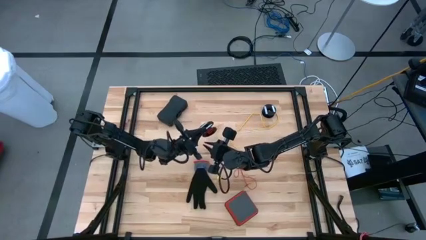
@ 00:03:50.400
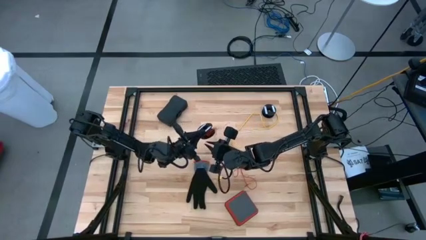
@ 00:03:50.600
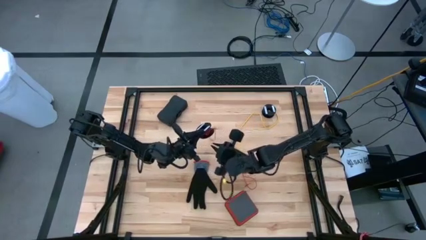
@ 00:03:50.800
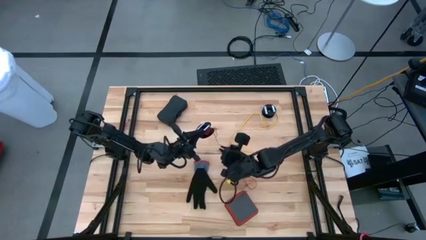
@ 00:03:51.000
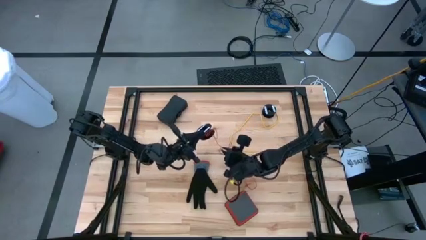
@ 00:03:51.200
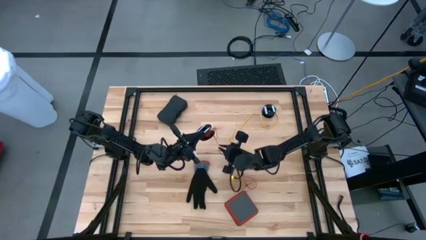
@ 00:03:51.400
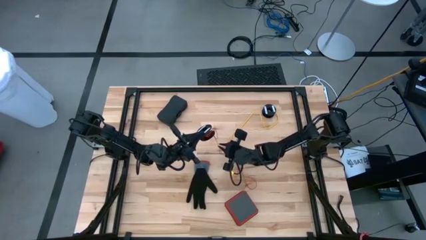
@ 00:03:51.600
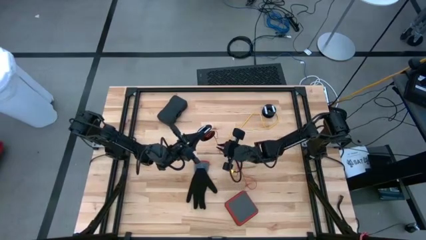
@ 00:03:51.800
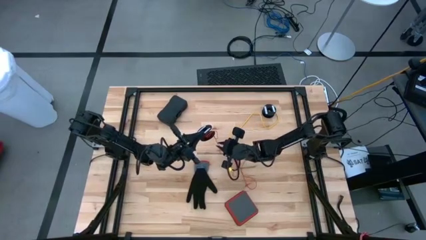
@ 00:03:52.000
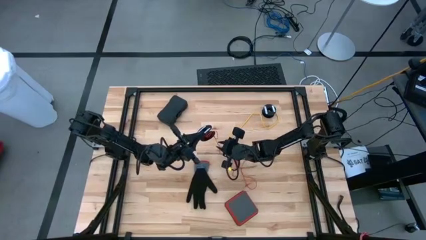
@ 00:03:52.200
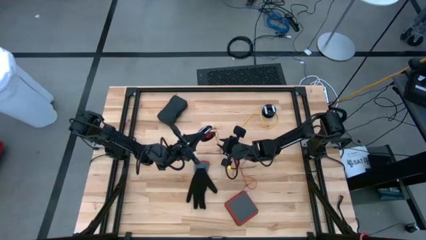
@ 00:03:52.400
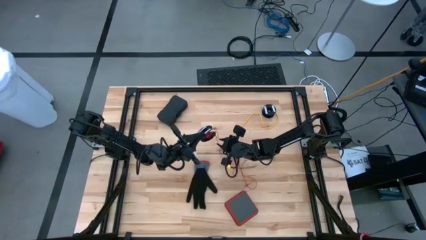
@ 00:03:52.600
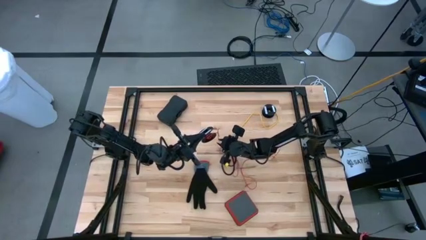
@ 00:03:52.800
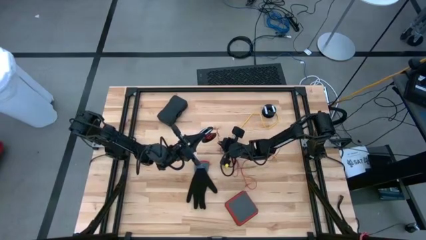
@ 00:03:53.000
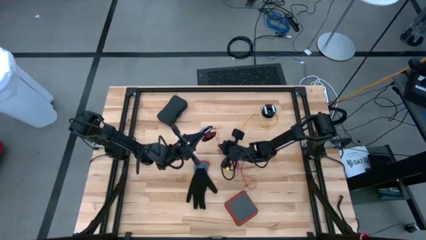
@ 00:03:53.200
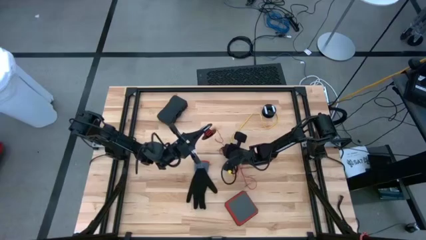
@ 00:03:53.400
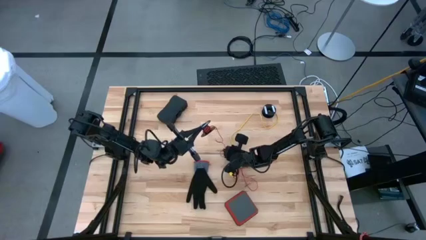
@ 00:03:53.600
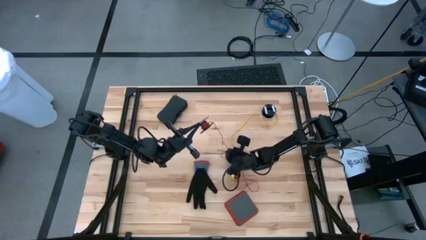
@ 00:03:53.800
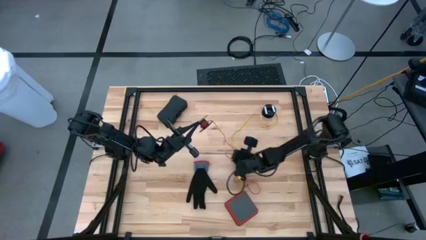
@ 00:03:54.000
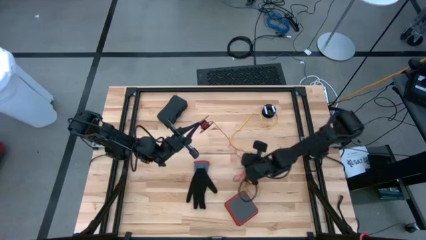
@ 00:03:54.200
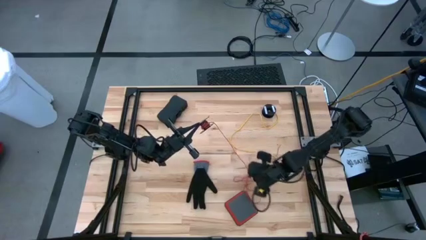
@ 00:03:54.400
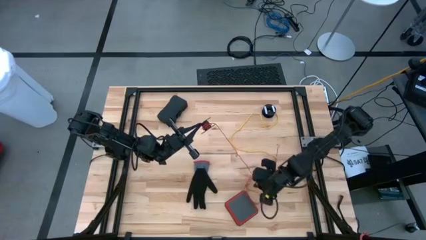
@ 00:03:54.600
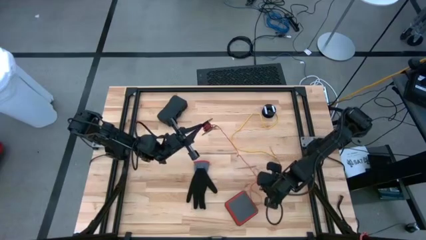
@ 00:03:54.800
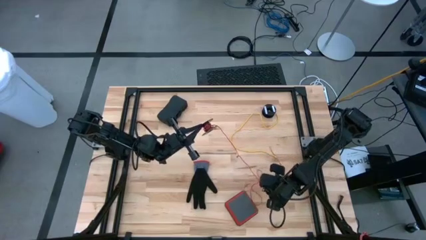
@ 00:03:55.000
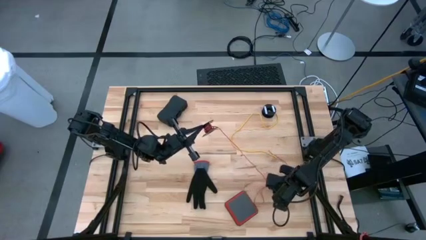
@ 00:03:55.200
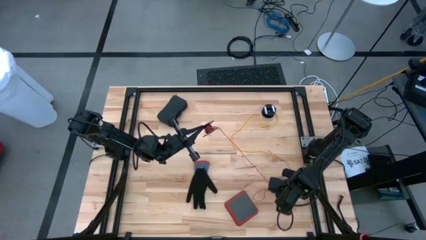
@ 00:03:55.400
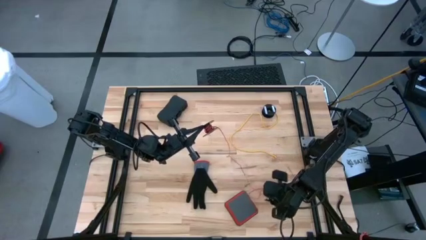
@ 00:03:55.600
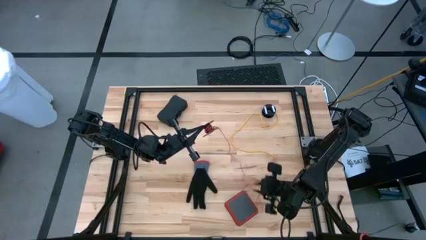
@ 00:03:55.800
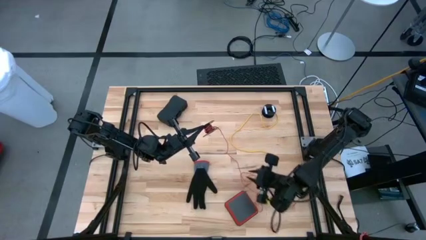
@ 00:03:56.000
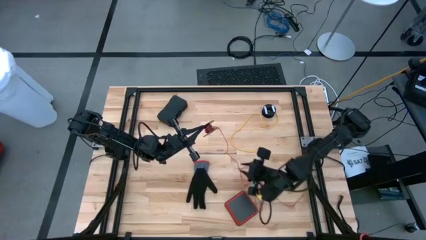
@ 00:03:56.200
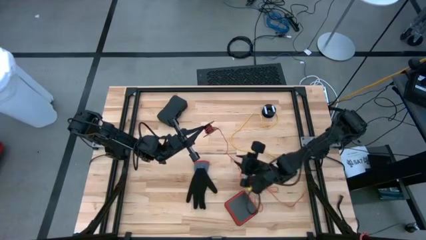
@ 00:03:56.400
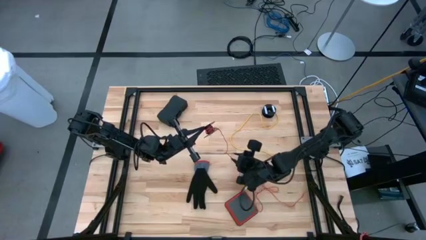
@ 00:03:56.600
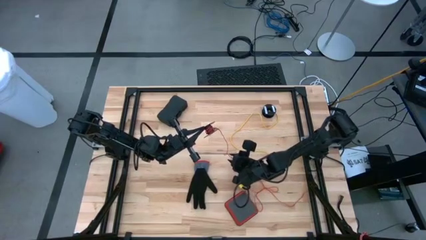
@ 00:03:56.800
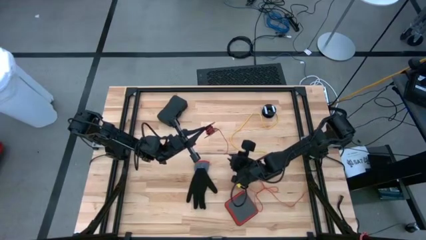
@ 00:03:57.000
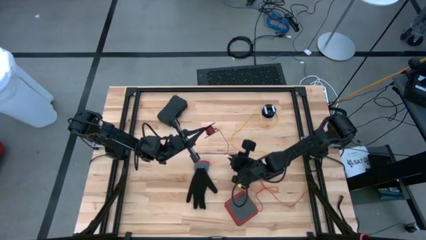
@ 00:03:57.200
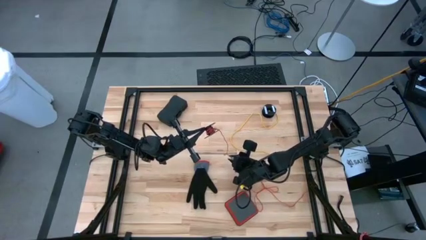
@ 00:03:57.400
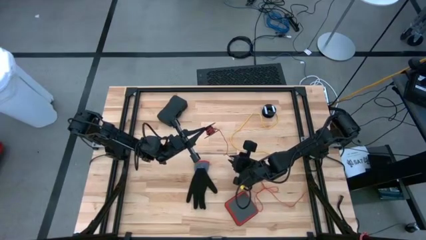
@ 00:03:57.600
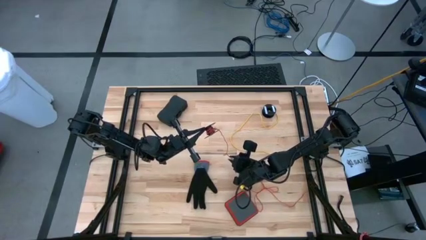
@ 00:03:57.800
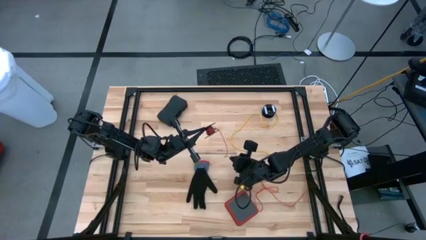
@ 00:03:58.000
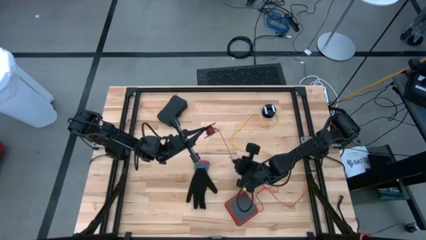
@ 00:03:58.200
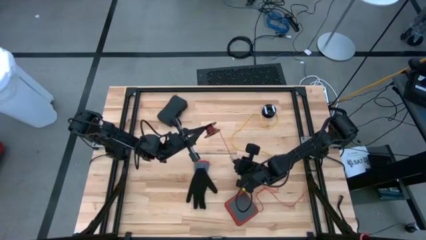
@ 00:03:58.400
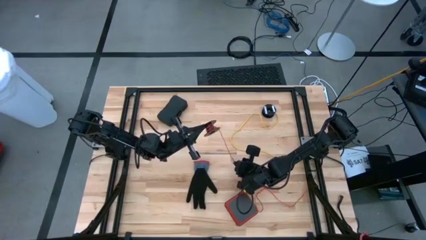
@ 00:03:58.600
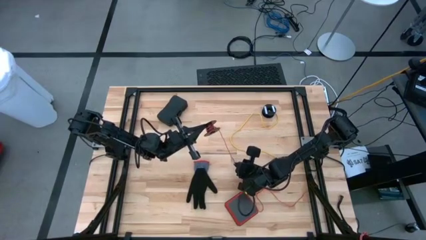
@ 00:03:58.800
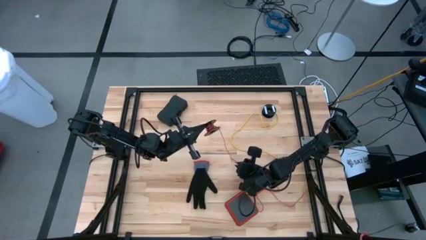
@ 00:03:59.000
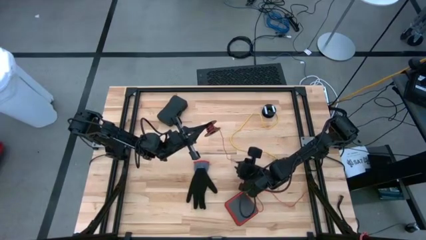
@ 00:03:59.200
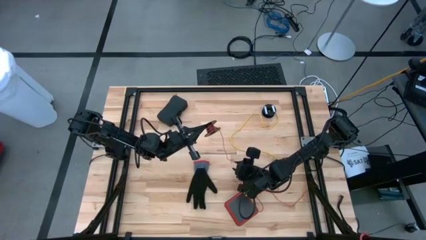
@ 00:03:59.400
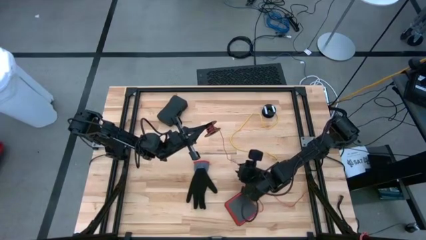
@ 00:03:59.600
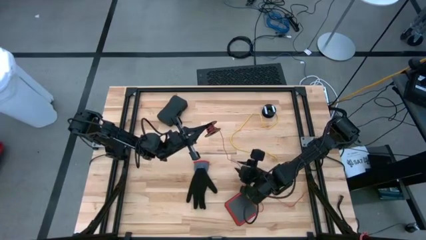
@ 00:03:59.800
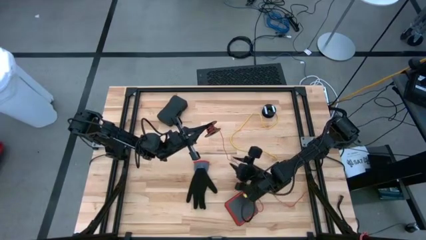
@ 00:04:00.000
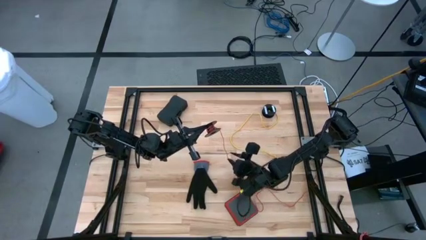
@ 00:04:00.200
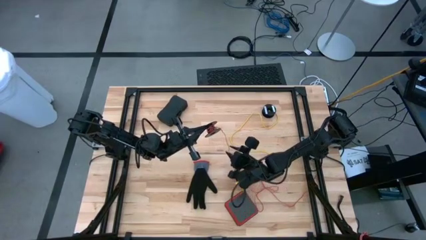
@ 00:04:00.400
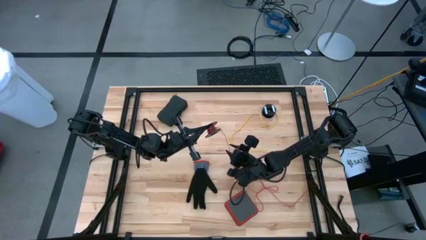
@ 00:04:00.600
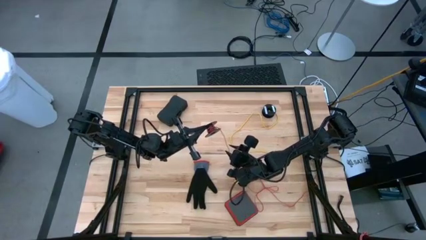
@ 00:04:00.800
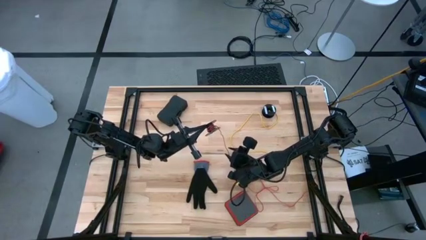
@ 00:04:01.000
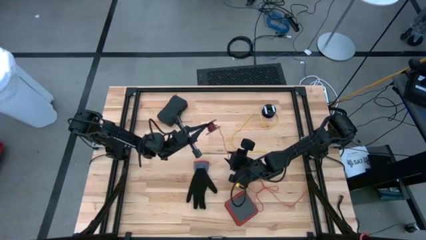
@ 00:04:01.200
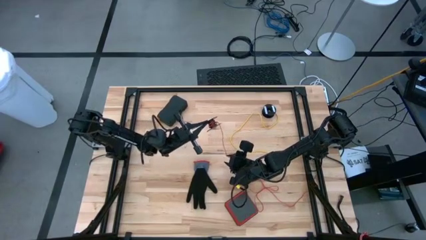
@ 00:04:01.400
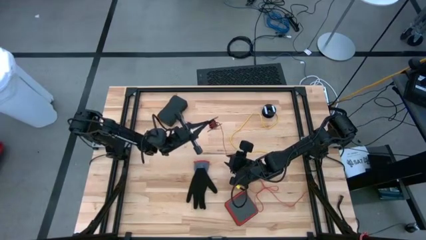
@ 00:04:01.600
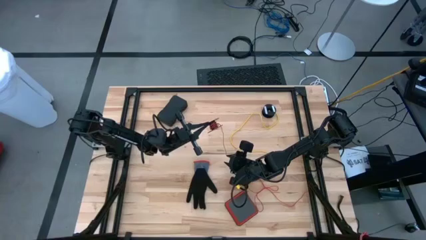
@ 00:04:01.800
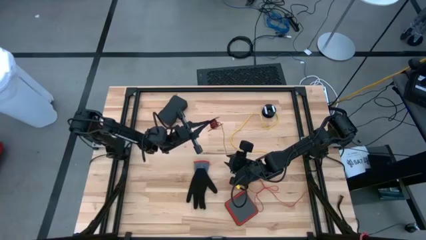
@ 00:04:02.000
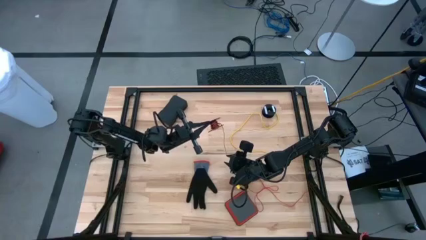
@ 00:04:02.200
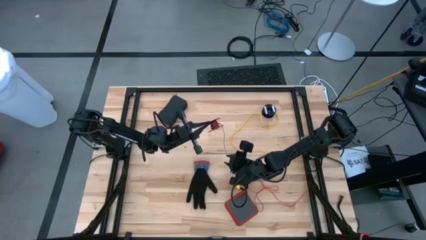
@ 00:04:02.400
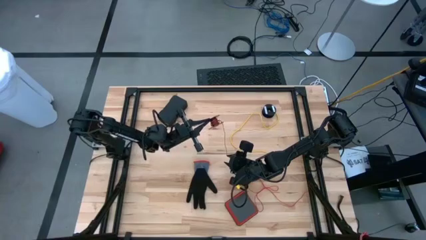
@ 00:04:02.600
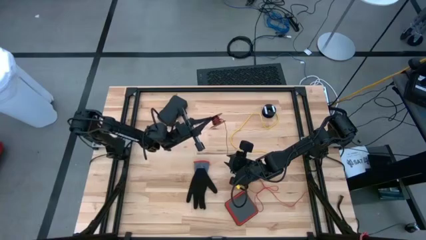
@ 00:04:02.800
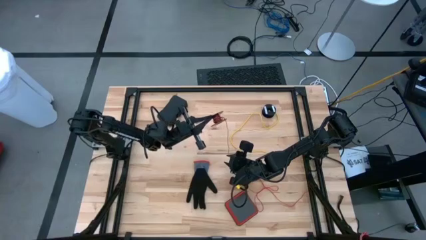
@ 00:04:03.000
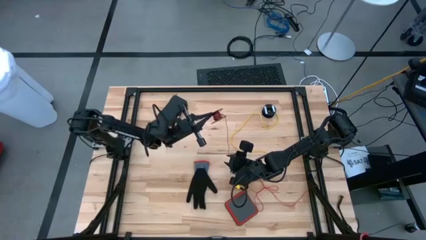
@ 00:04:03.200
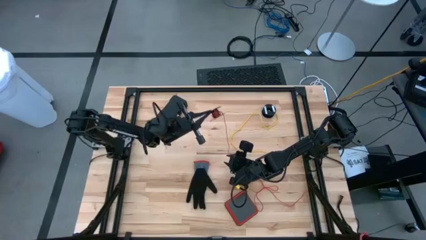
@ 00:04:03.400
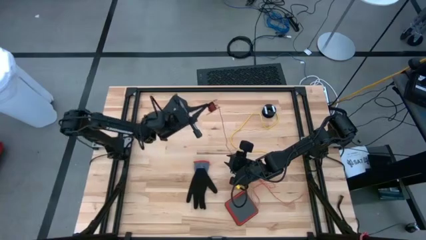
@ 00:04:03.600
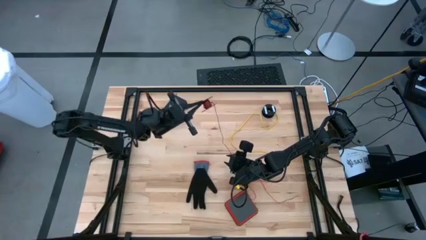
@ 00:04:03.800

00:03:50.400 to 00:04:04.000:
Task: Coil cords
Coil the red wire onto the black spool

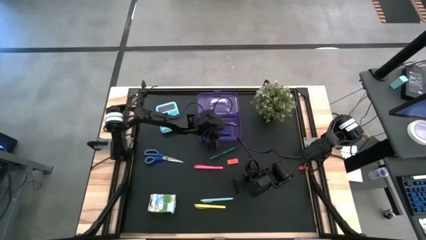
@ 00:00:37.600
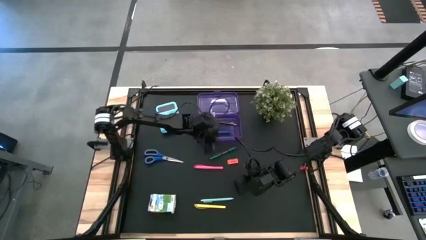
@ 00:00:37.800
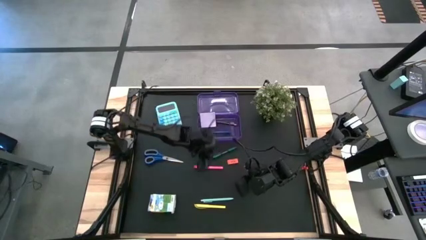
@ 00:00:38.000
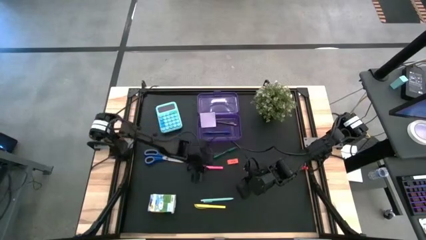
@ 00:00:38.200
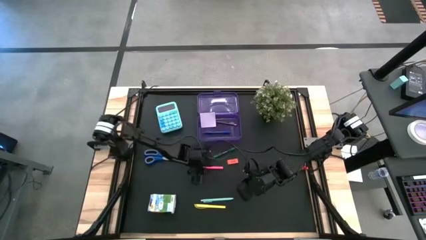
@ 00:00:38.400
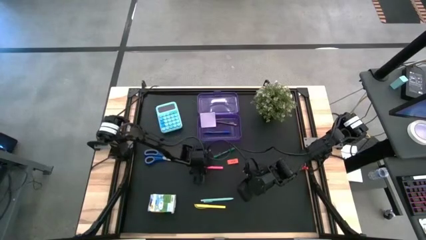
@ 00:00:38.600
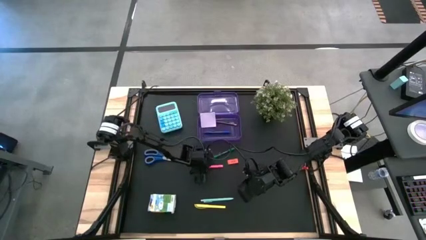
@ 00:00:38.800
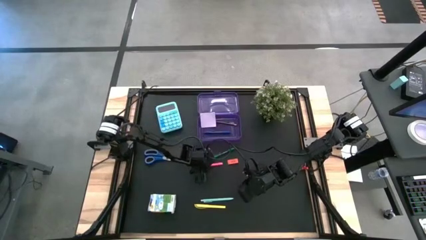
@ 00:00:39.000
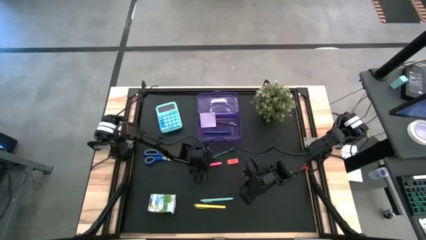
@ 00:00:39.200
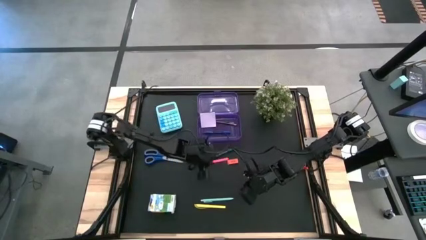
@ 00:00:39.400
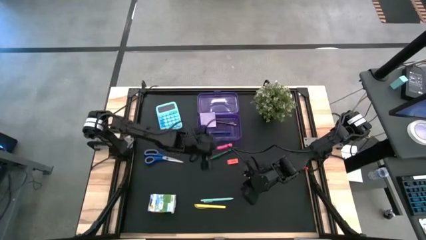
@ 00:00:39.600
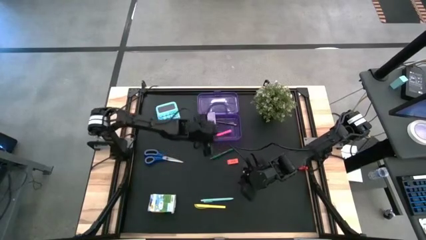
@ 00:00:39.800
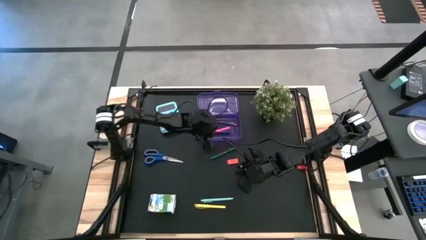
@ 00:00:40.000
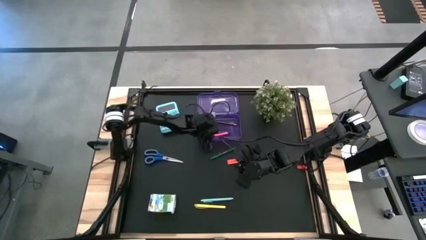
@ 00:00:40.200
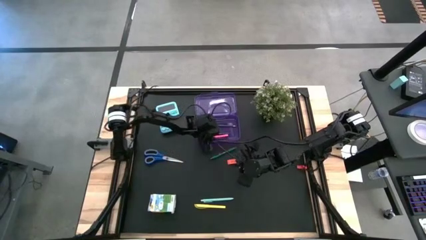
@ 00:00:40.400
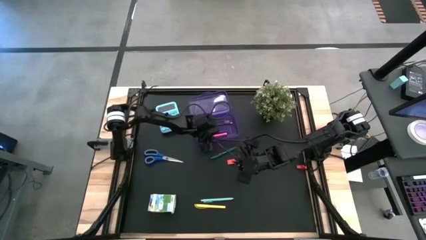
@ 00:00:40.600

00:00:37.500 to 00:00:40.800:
Task: Pack school essentials
Put the pink pen into the purple supply box
